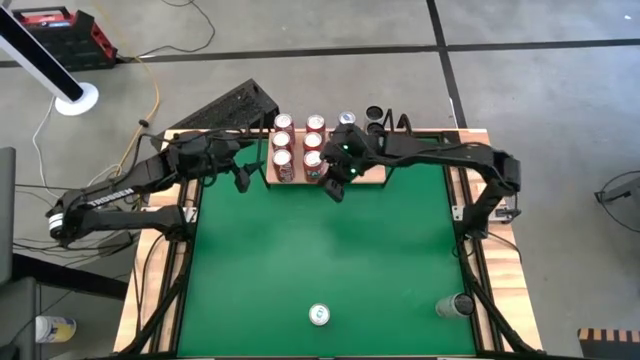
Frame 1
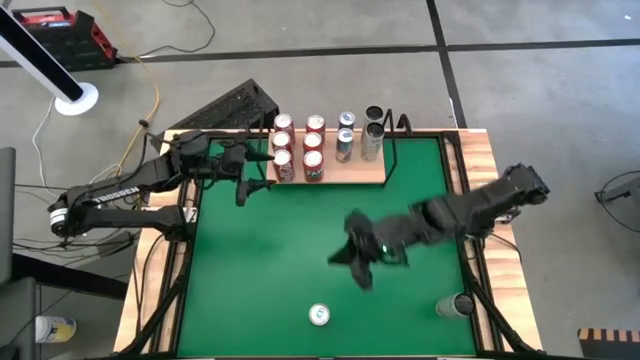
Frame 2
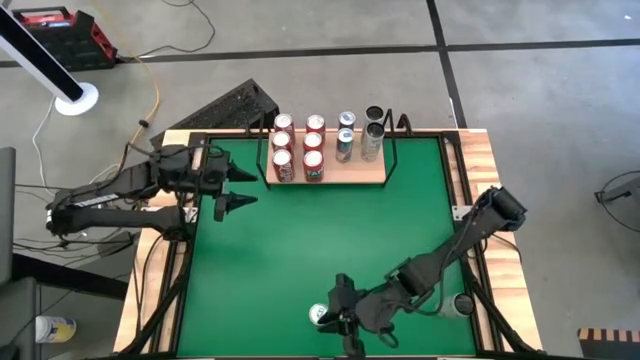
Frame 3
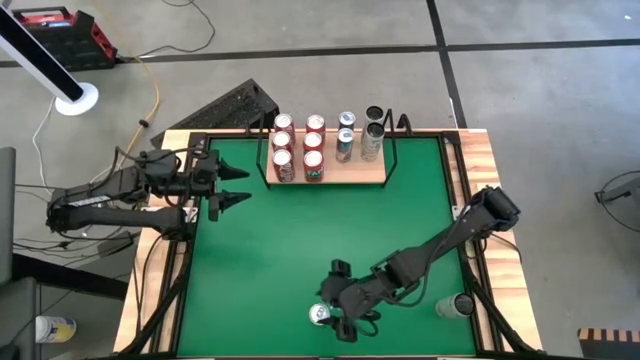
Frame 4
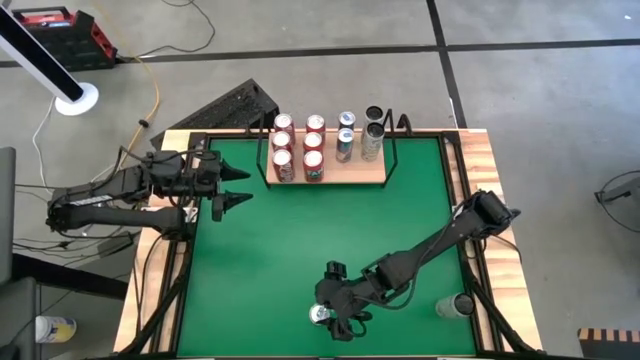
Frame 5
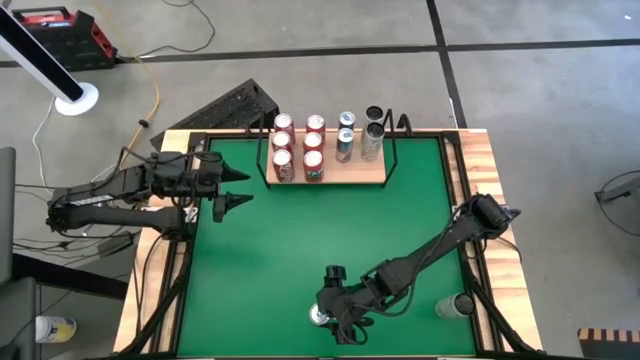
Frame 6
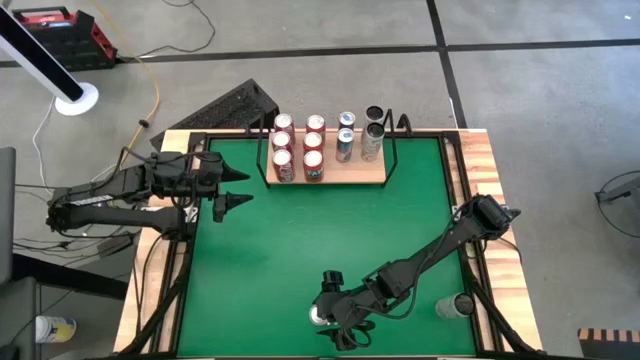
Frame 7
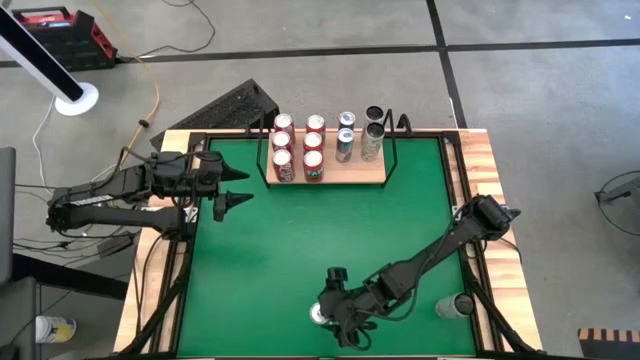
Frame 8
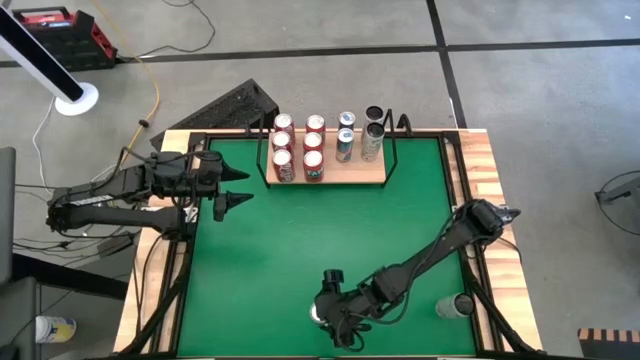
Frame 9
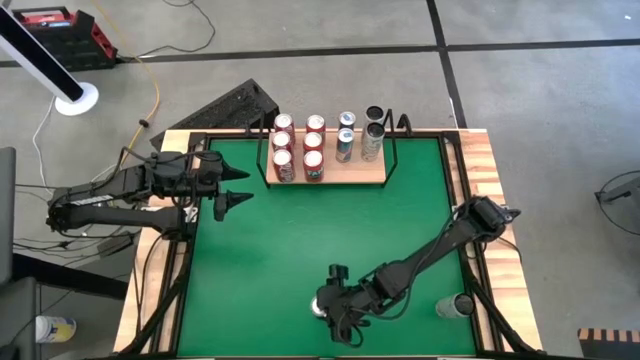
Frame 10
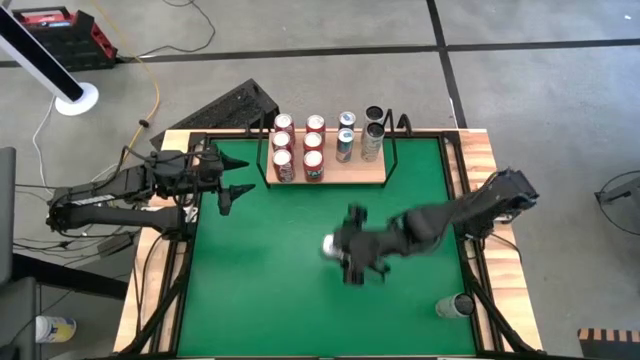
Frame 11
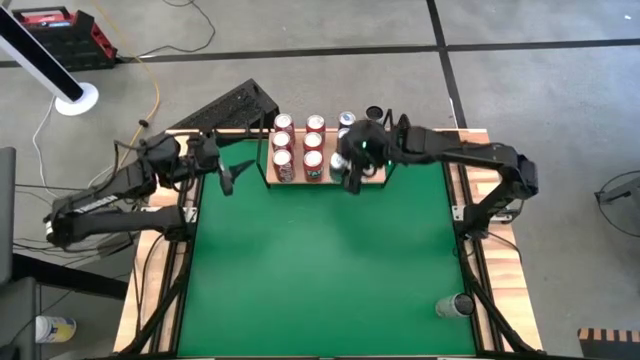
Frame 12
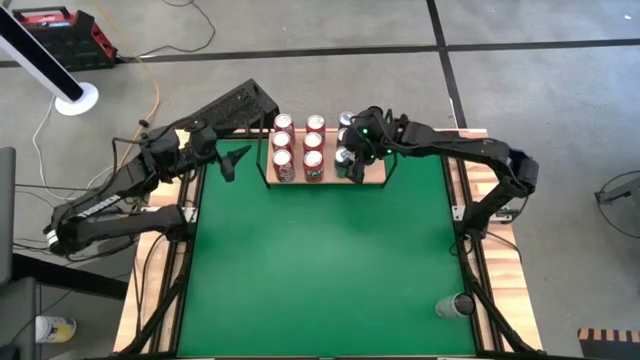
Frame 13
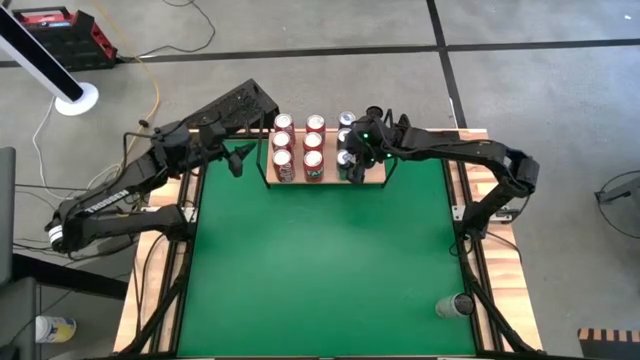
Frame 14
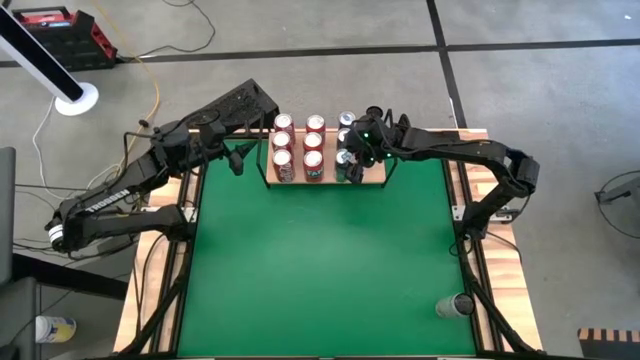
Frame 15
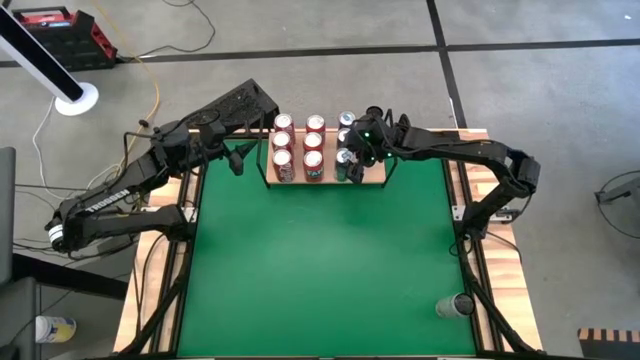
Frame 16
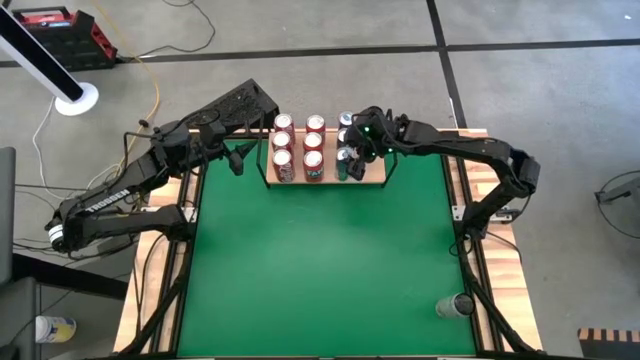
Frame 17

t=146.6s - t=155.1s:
Task: Place canned beverage on shelf
Put the blue soda can on the shelf

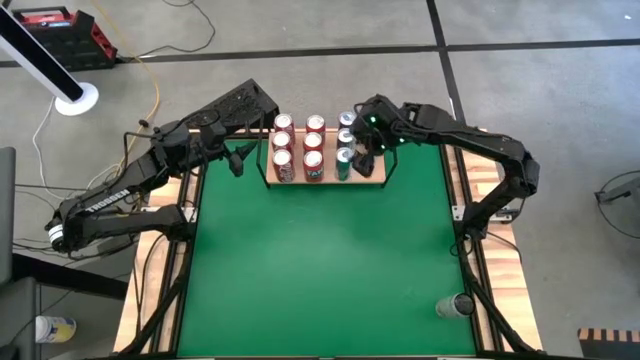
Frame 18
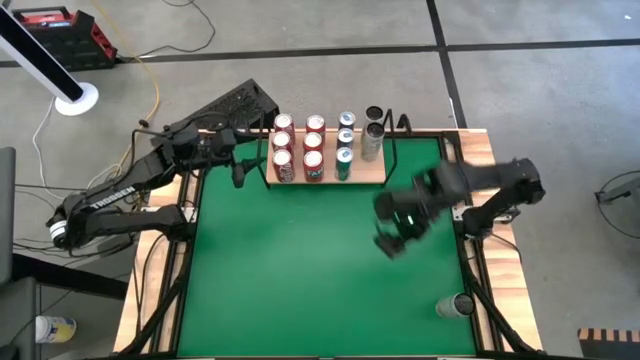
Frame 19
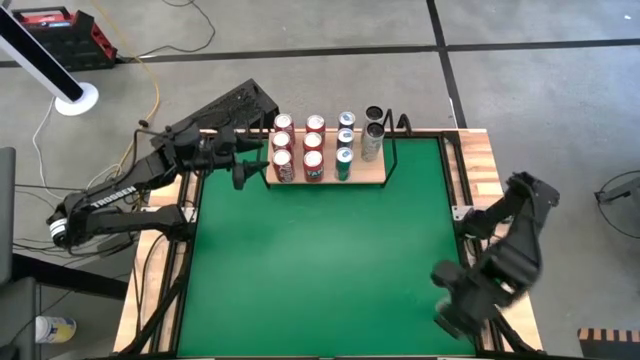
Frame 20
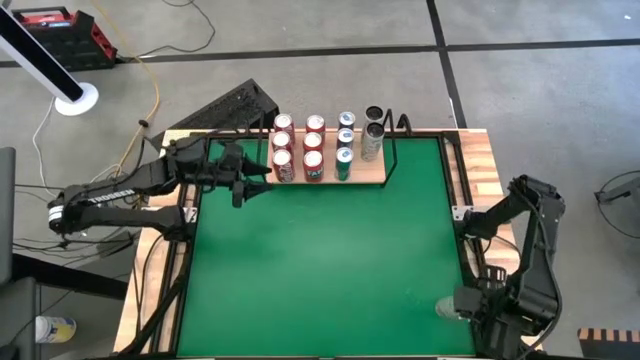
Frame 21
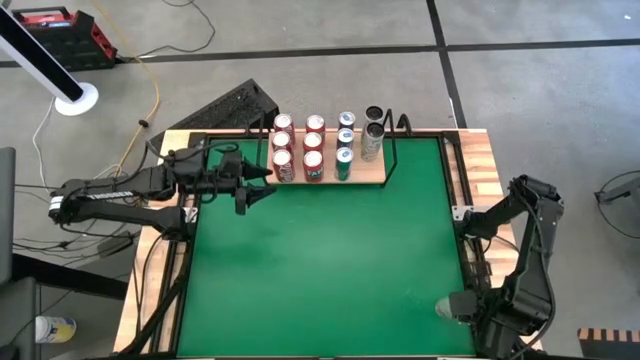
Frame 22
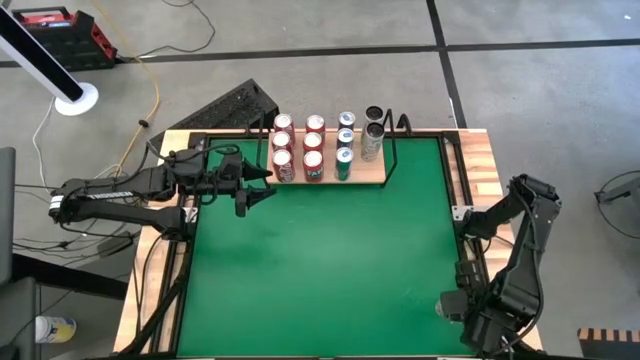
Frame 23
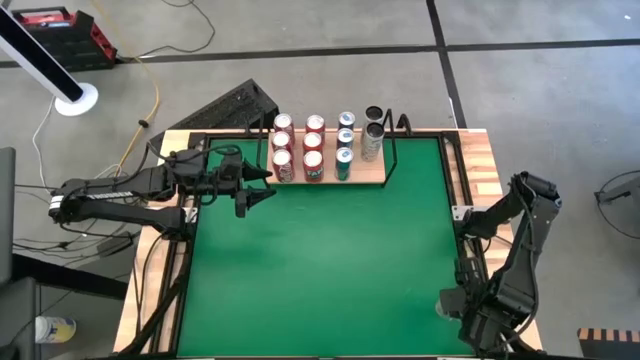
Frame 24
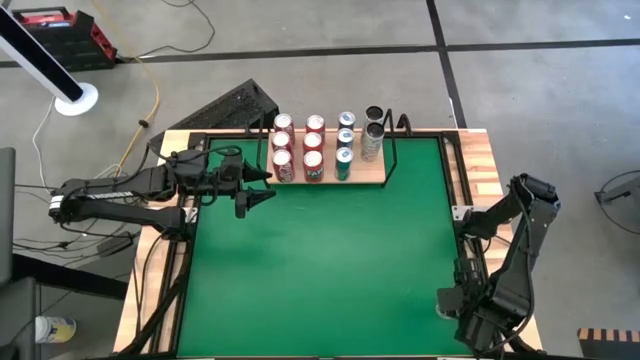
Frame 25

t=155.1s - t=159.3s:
Put the white soda can on the shelf

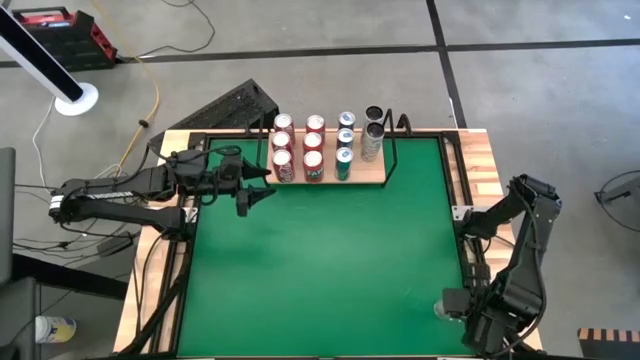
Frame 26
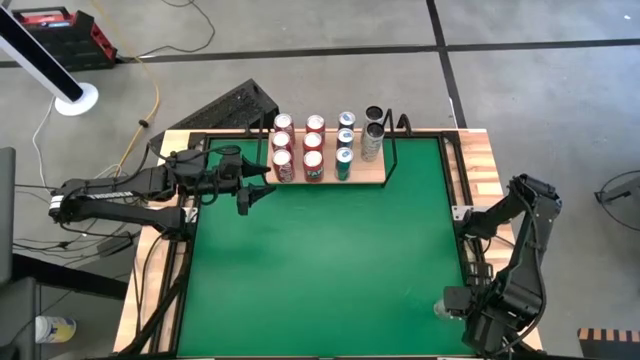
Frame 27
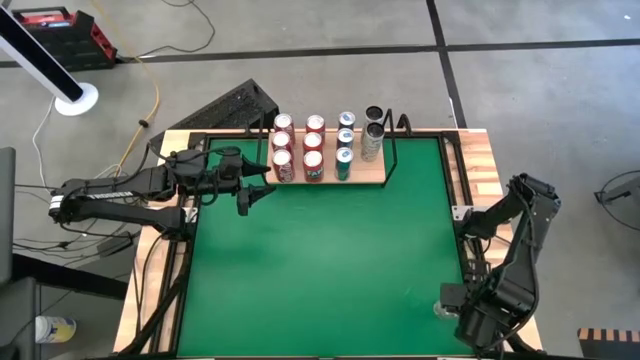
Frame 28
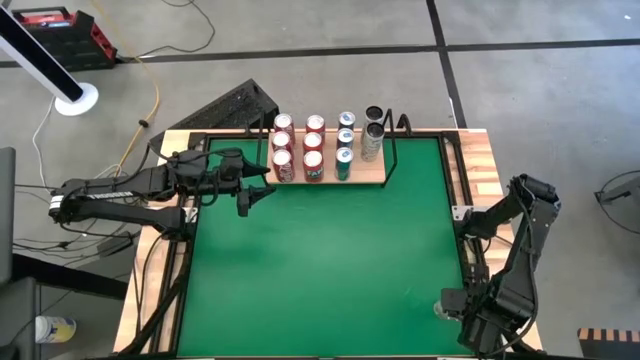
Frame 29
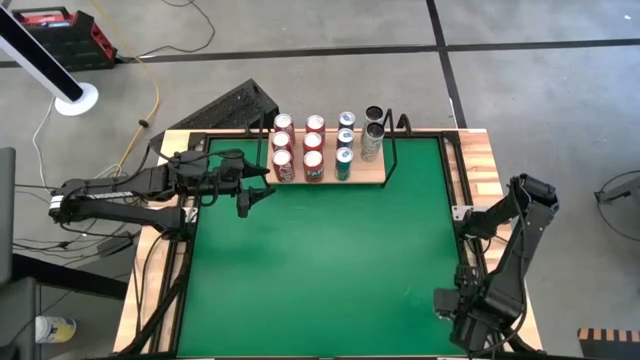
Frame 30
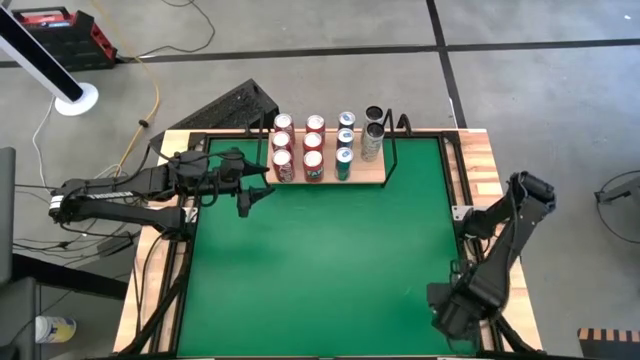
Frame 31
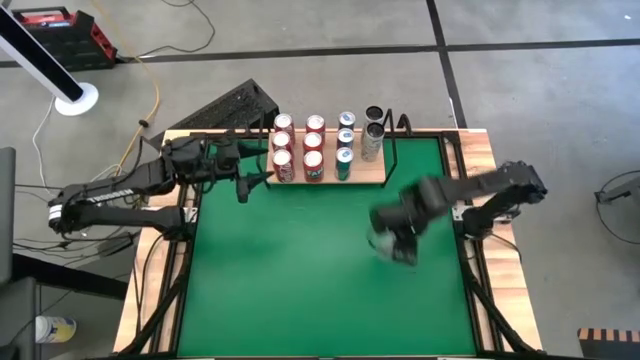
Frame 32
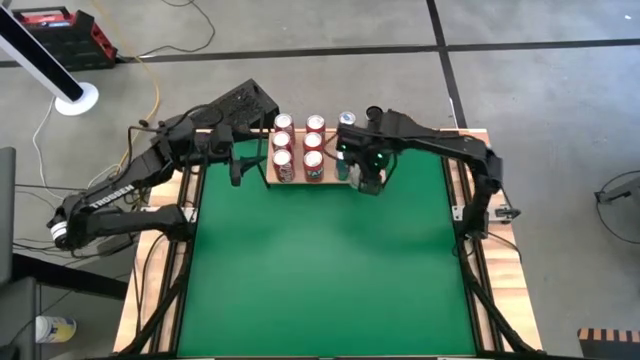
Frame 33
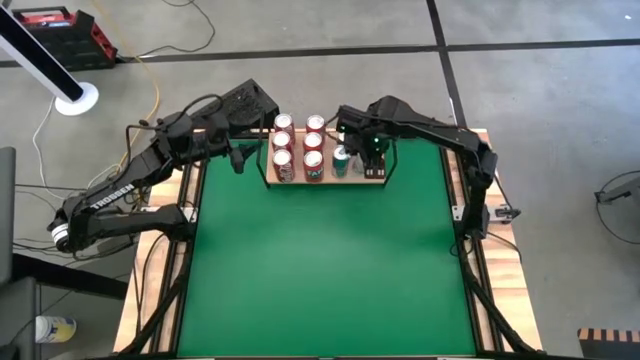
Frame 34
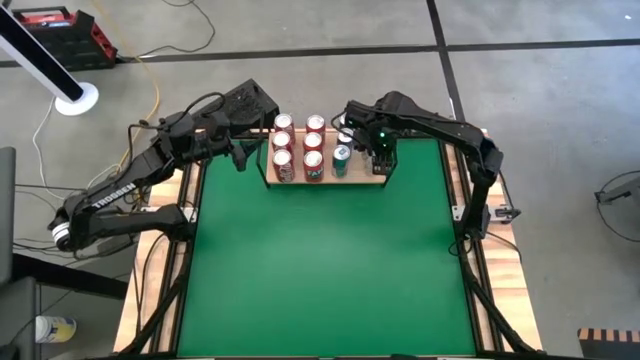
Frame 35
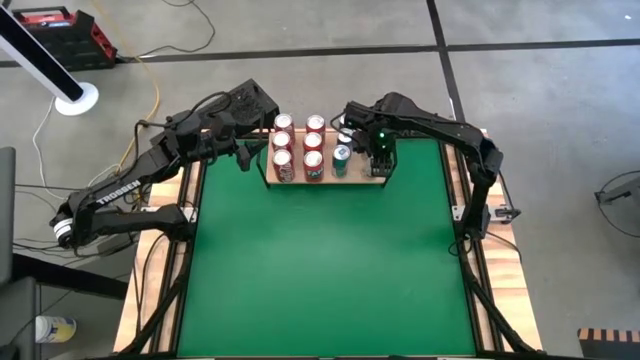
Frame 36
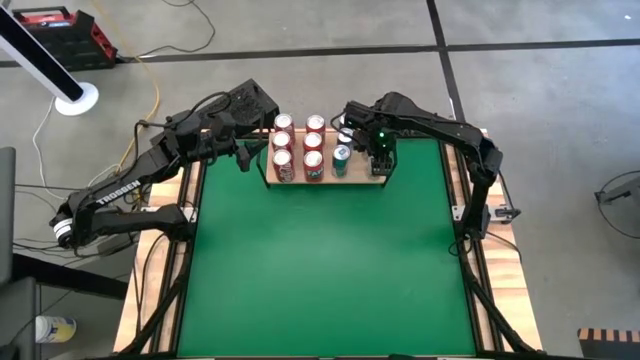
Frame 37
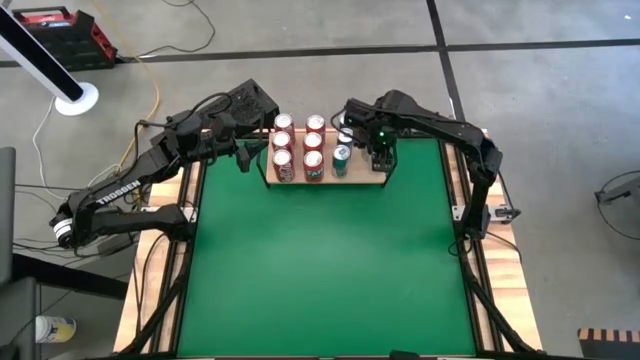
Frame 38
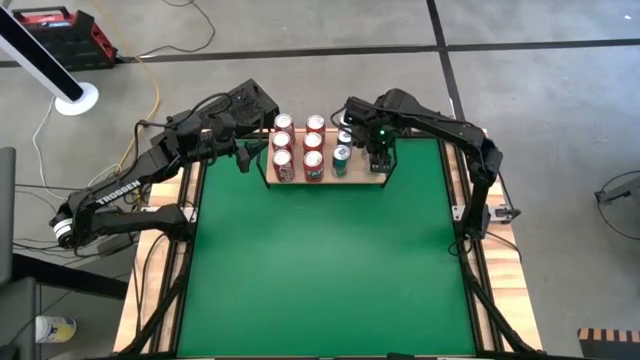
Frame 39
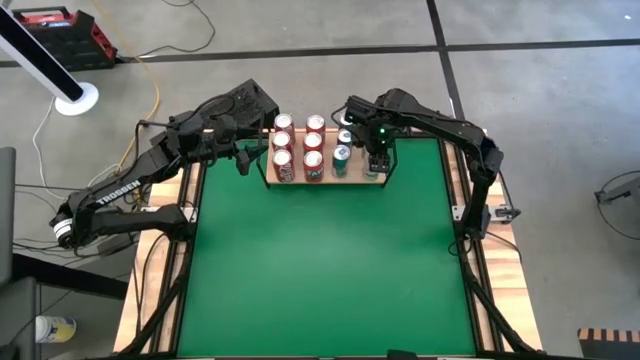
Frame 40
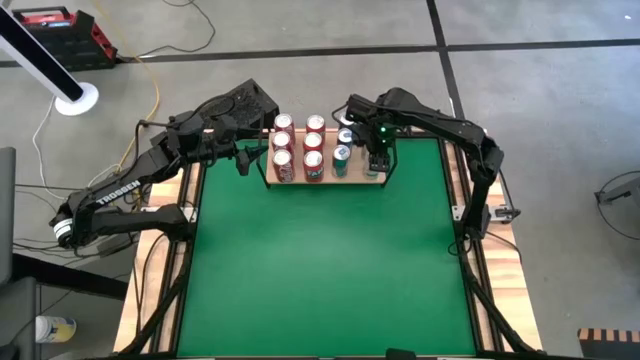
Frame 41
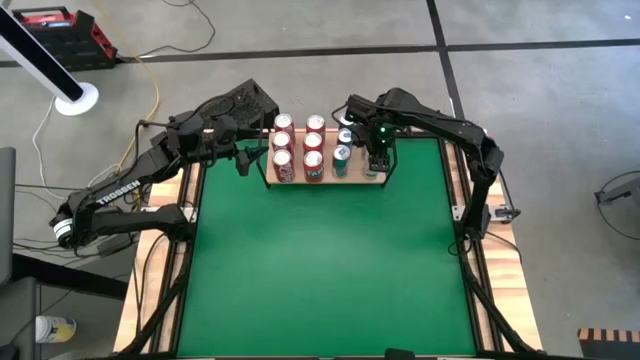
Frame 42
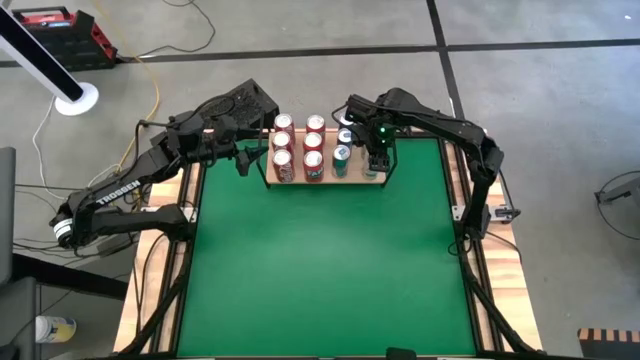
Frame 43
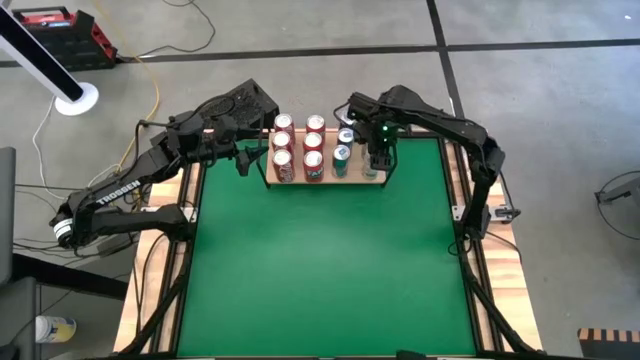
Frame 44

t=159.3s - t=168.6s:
Put the white soda can on the shelf

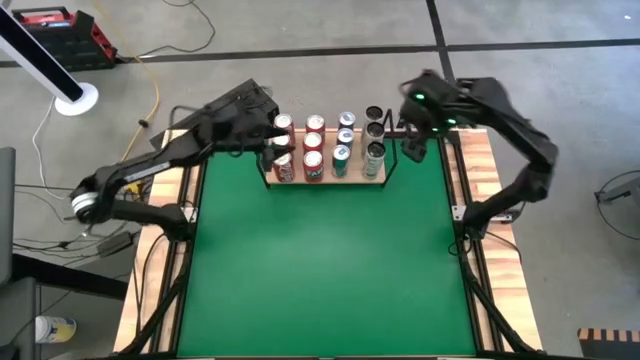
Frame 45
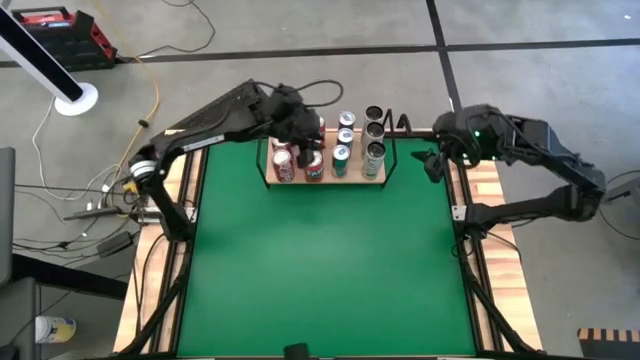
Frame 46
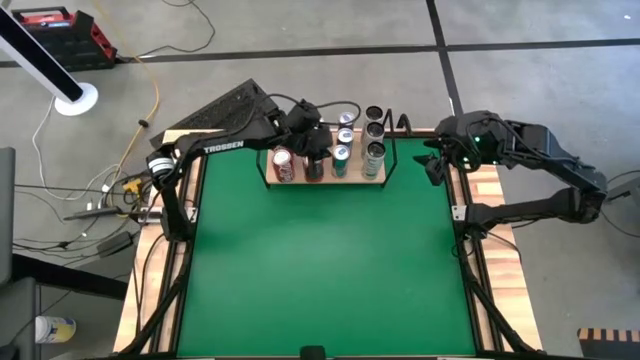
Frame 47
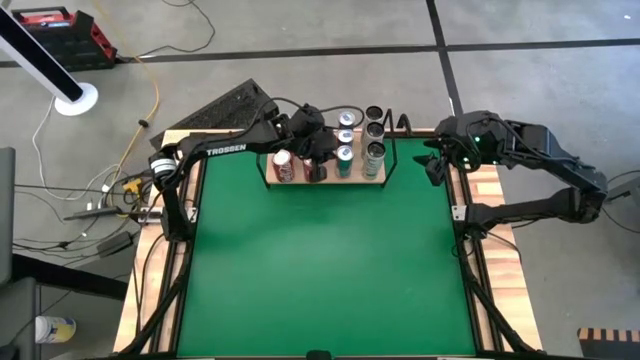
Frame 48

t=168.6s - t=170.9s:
Adjust the blue soda can on the shelf
